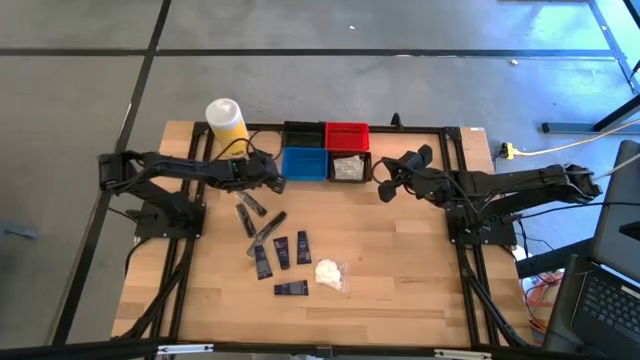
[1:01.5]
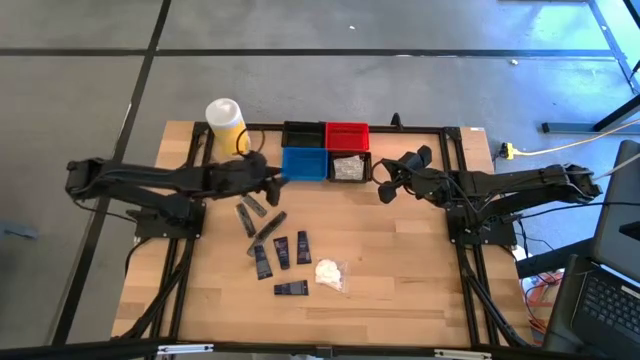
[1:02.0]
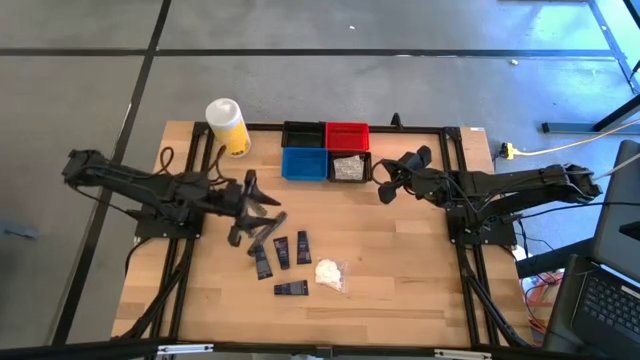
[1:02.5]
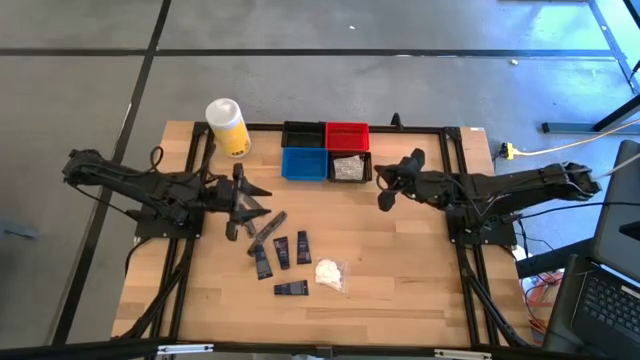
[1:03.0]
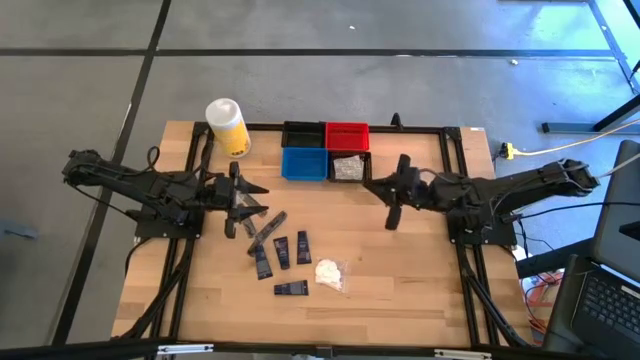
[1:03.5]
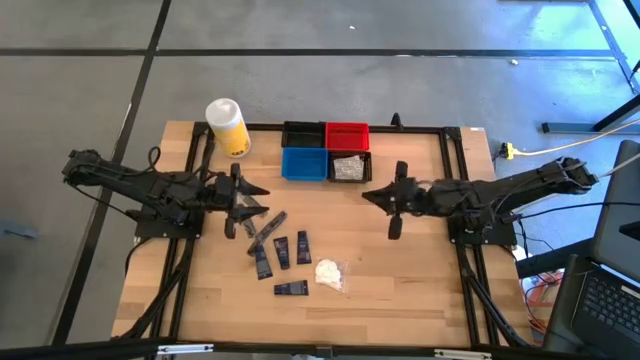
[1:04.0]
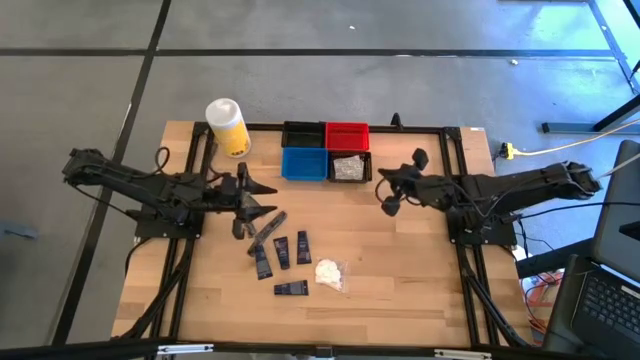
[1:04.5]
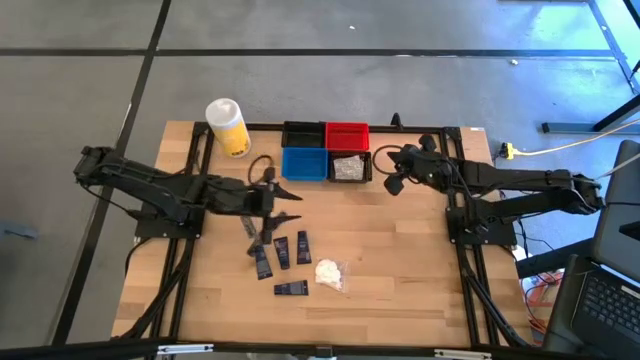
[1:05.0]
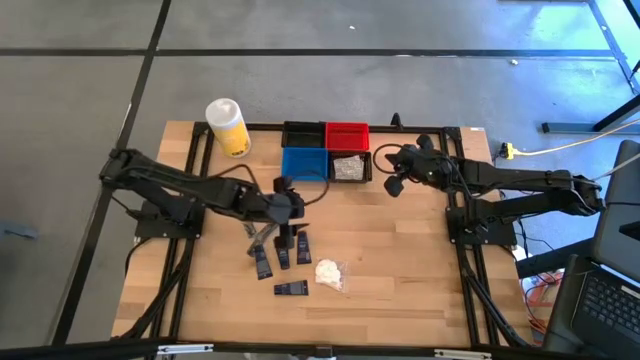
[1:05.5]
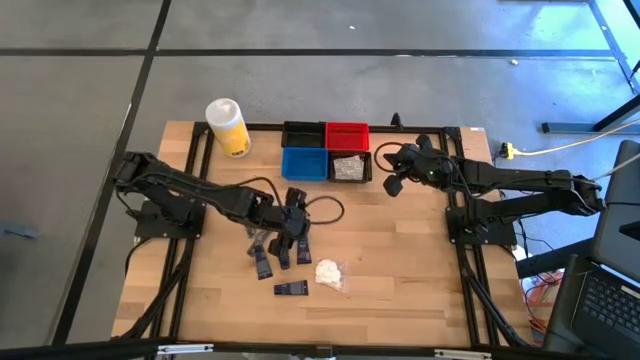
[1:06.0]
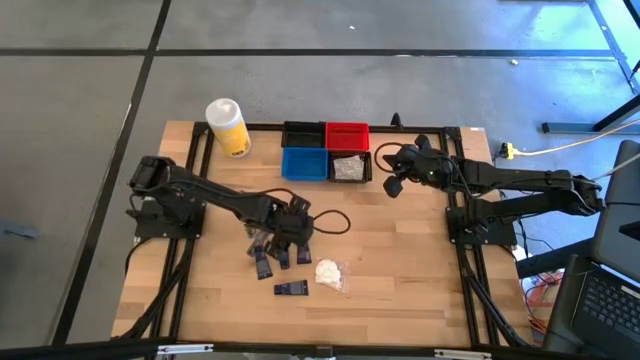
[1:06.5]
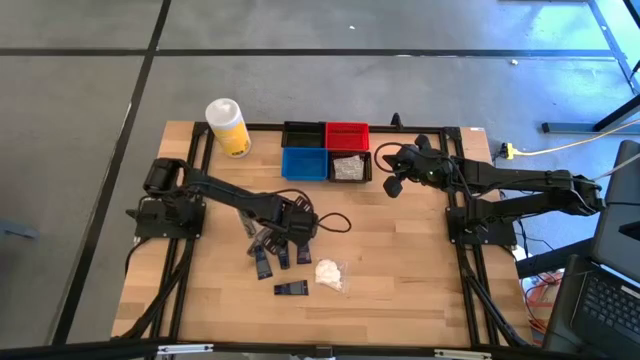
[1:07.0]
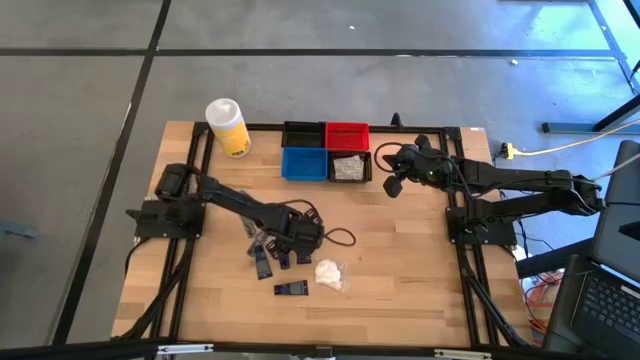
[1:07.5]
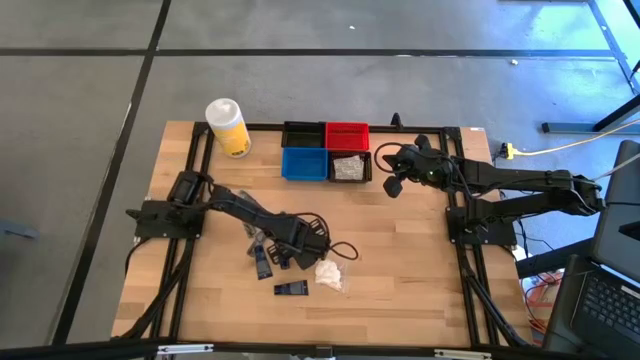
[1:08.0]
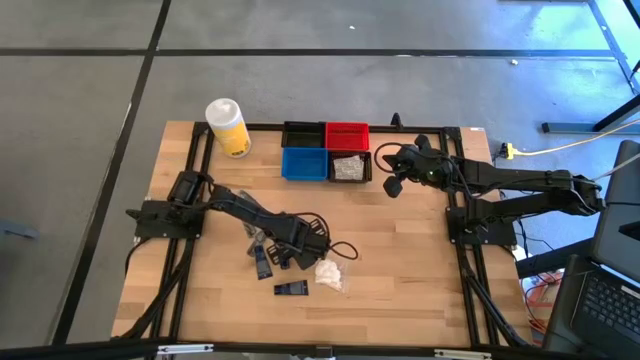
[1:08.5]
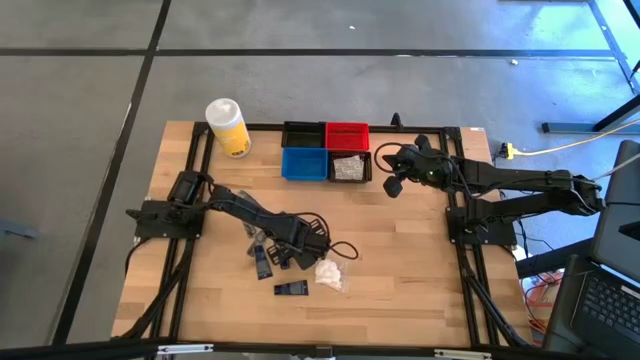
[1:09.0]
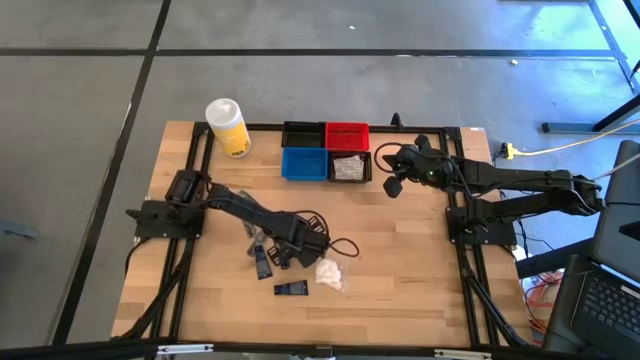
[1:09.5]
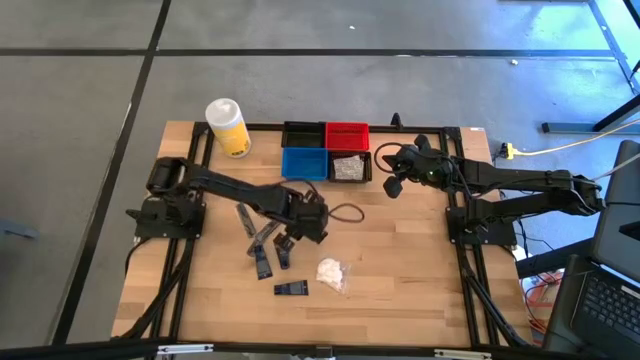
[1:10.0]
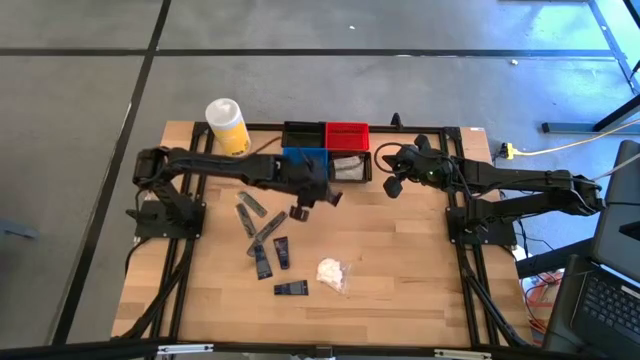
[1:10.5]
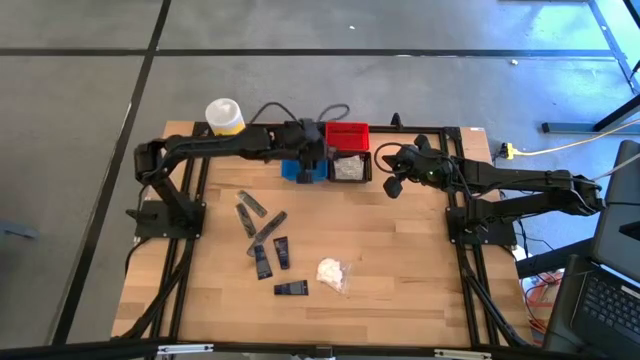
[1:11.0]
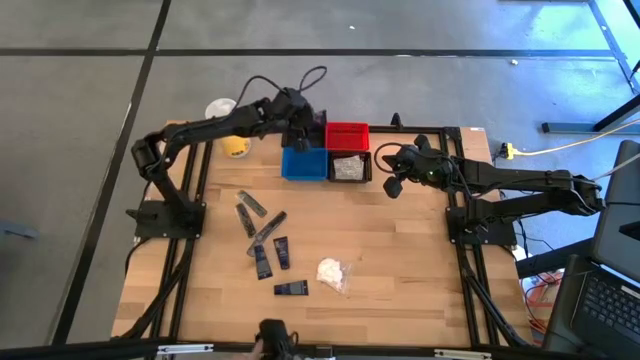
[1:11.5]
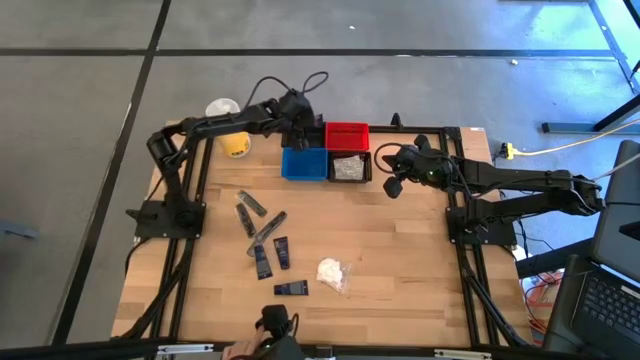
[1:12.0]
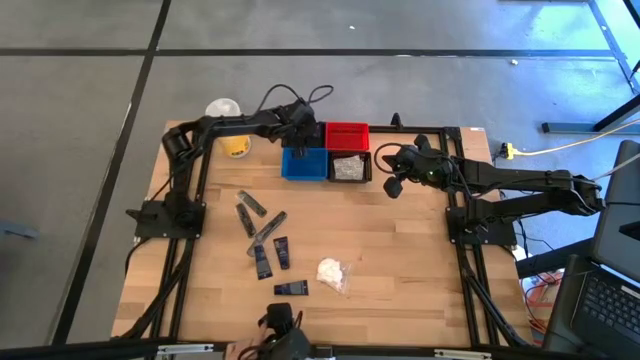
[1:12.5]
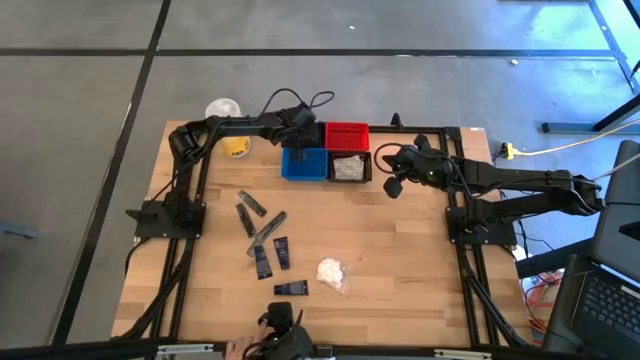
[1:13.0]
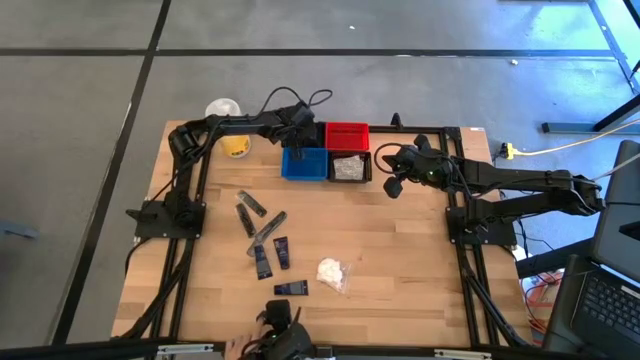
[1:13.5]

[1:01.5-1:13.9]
Task: Pick & Place Travel size toiletries
Put the shave cream into the top black bin

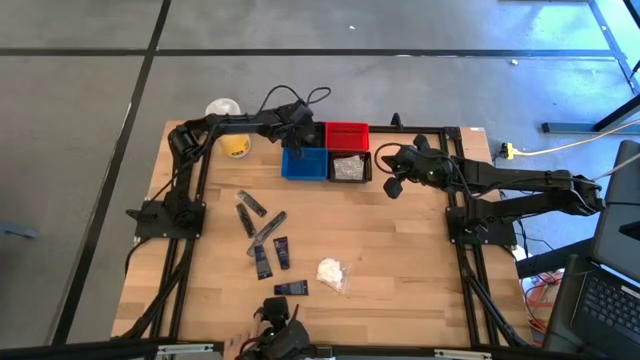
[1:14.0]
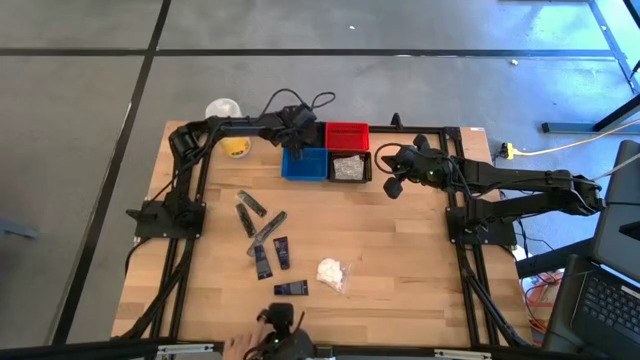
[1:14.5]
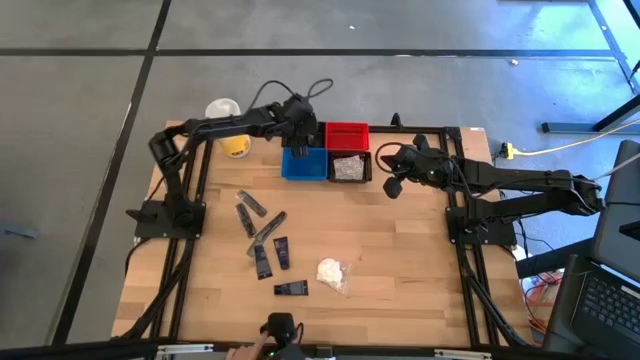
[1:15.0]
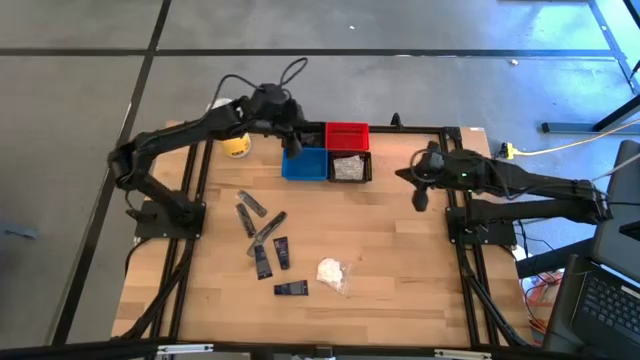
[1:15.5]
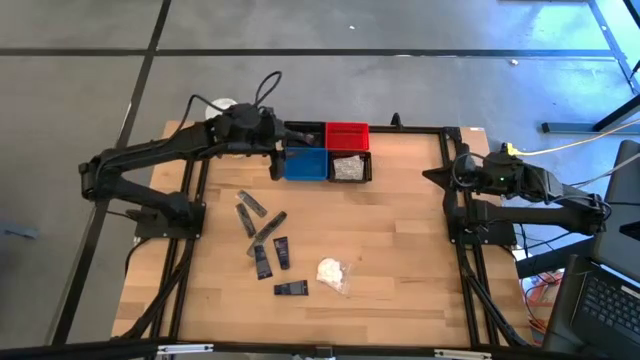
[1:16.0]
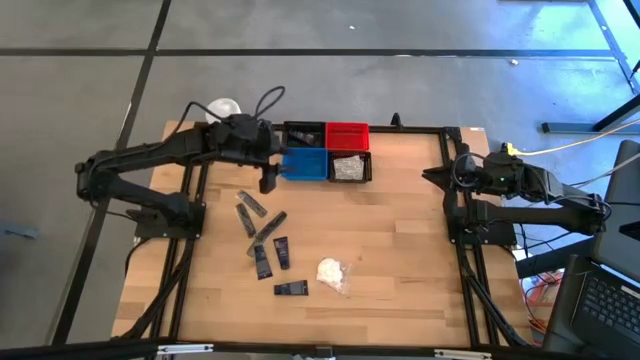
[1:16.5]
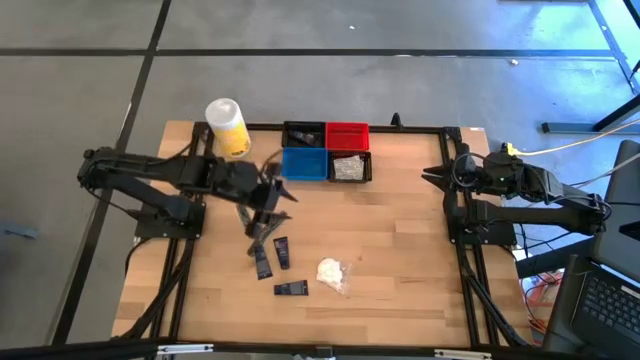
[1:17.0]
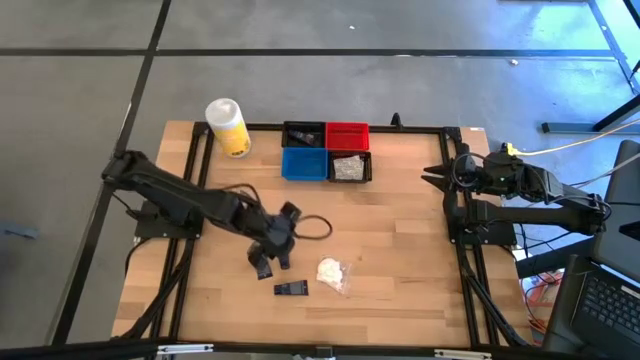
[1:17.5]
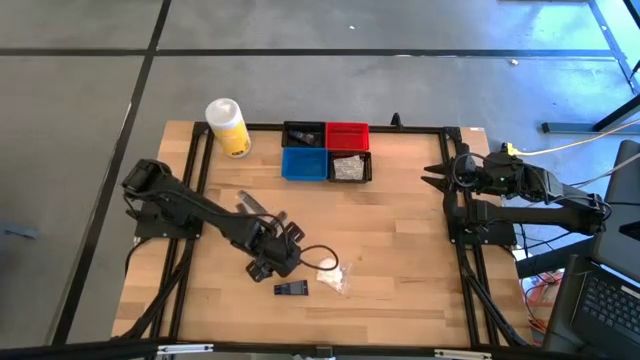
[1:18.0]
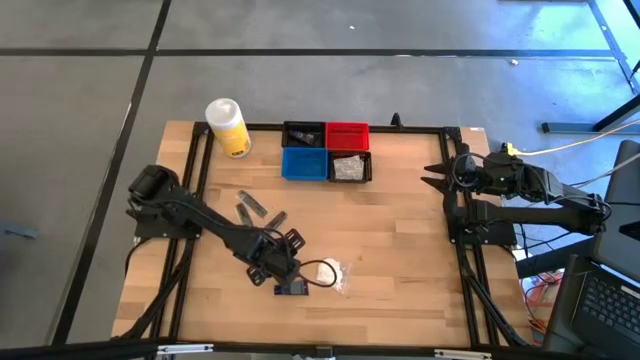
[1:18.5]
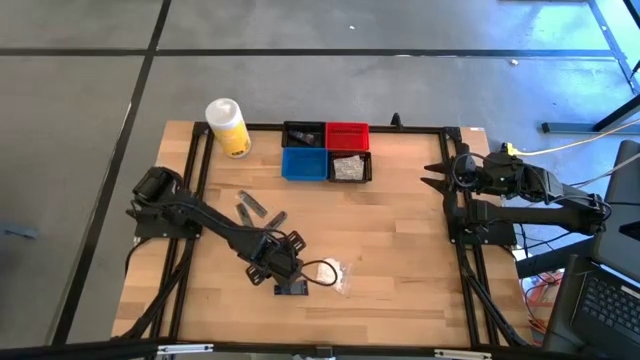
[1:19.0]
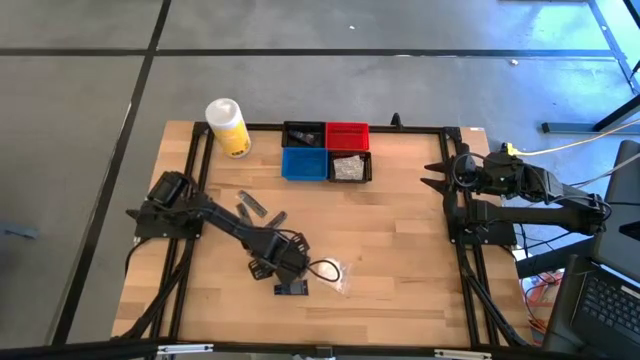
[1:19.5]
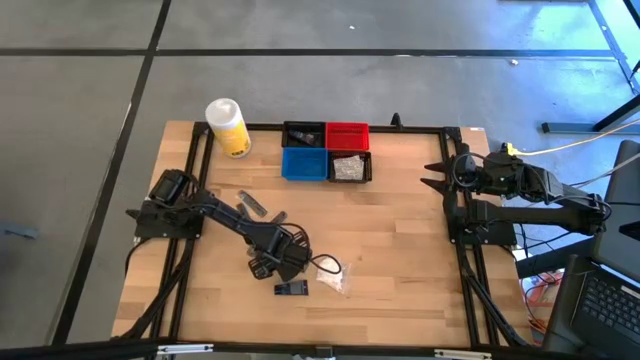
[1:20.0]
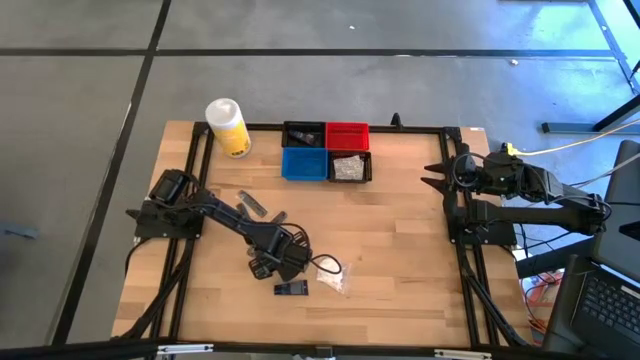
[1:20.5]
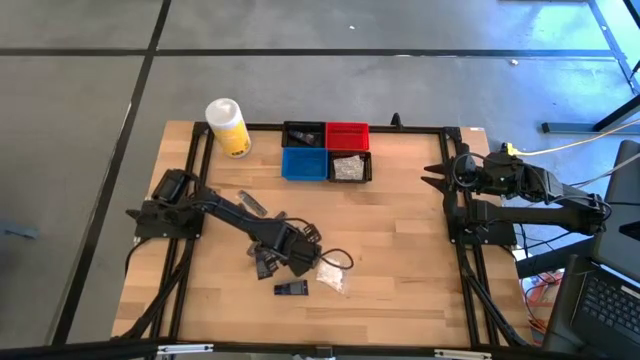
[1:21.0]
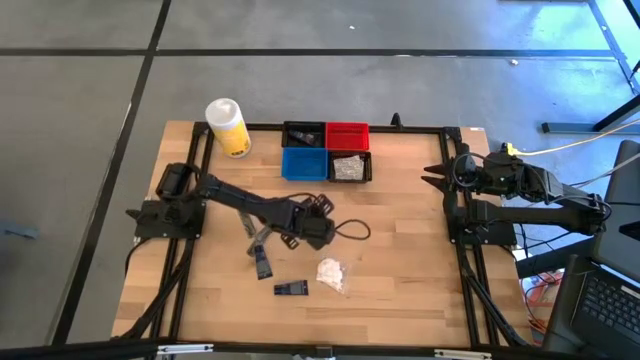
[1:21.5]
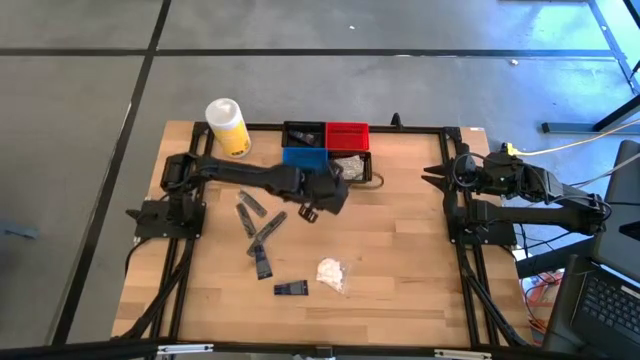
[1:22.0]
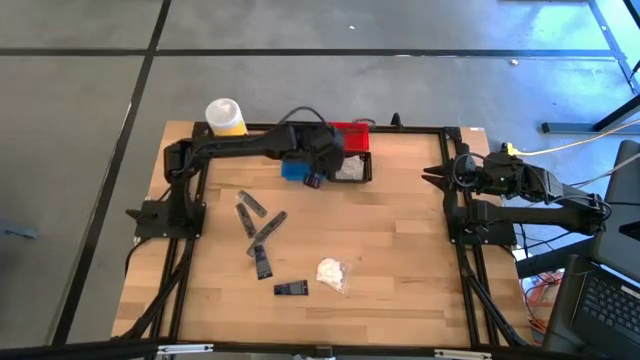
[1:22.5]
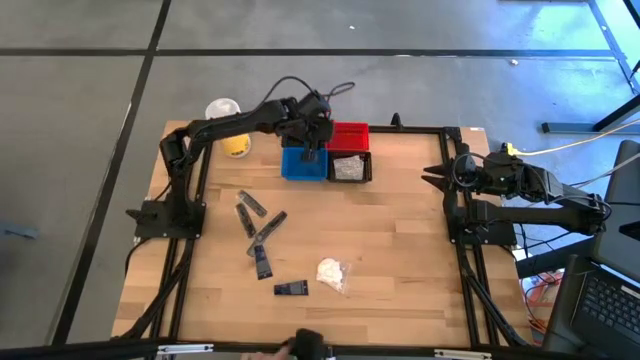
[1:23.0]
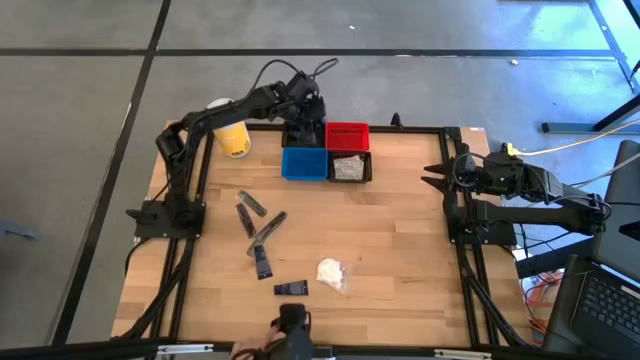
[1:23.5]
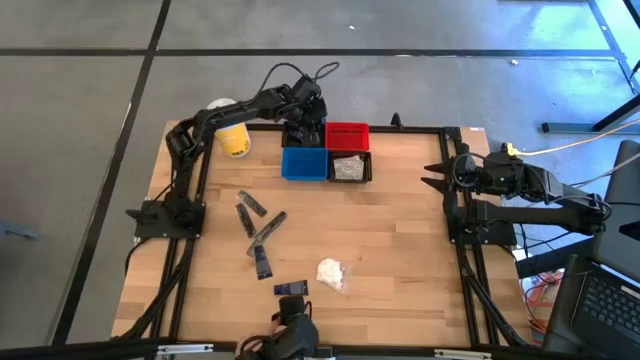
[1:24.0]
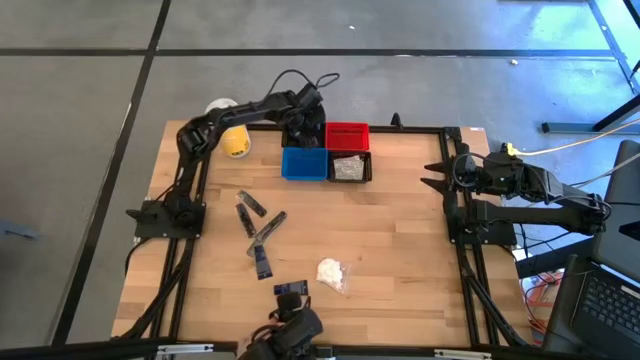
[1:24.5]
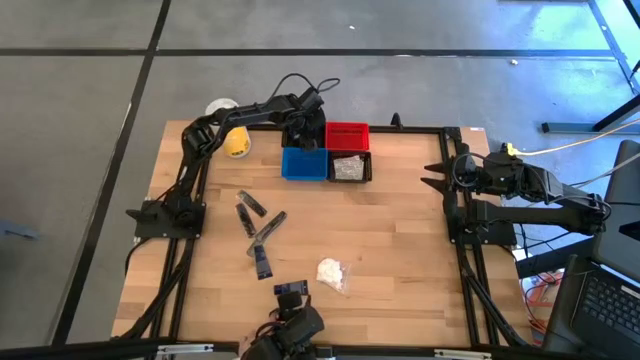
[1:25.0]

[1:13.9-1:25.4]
Put the top right shave cream into the top black bin
